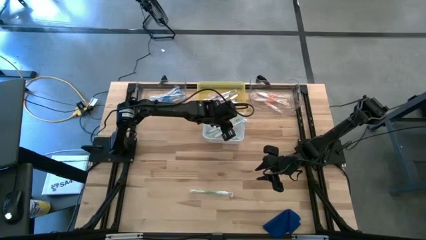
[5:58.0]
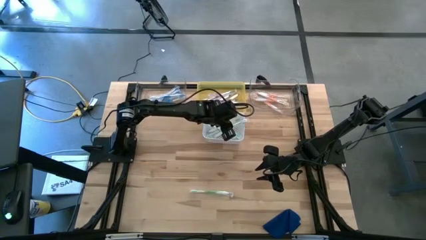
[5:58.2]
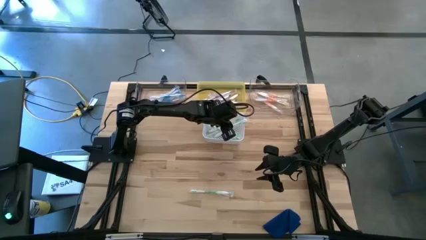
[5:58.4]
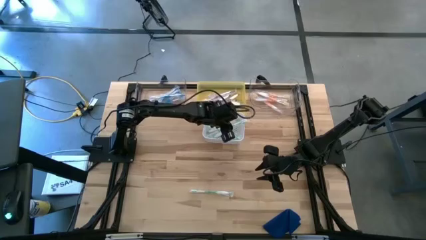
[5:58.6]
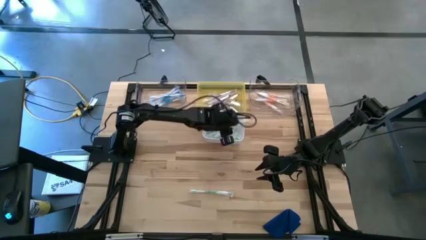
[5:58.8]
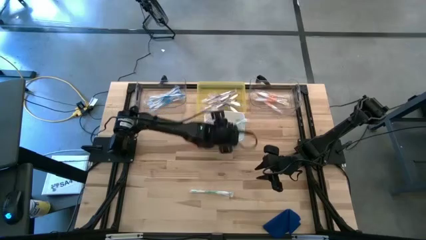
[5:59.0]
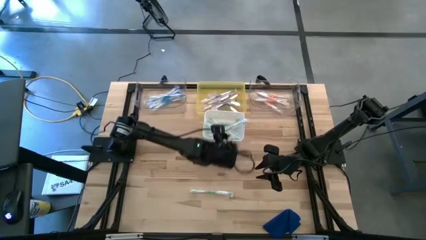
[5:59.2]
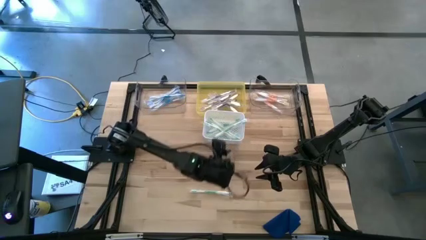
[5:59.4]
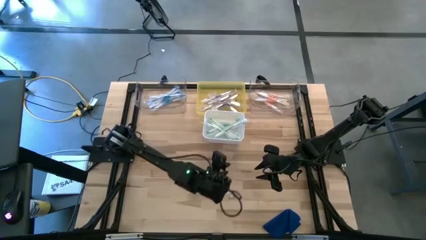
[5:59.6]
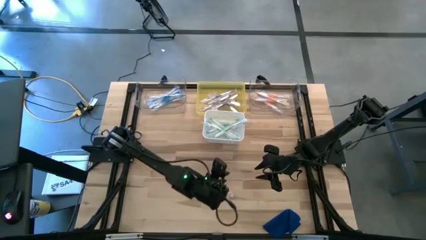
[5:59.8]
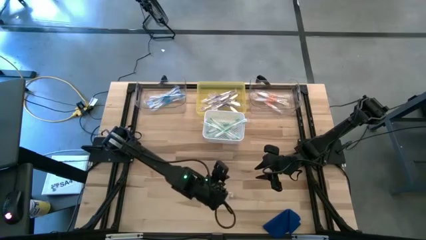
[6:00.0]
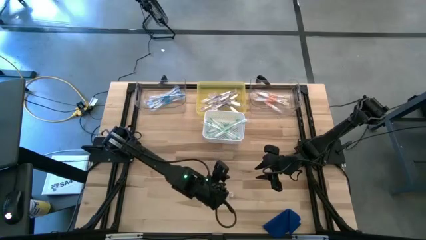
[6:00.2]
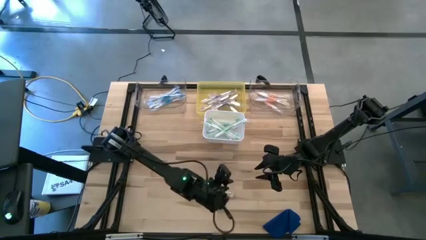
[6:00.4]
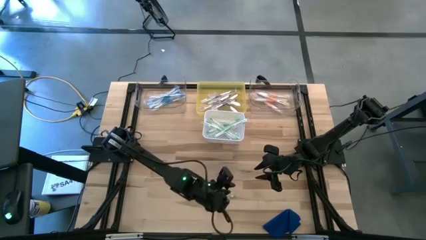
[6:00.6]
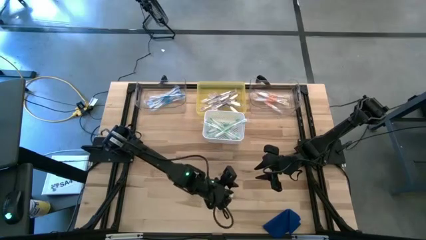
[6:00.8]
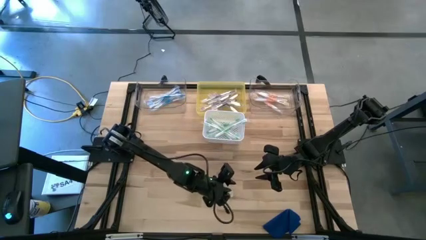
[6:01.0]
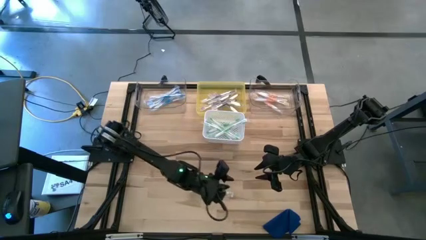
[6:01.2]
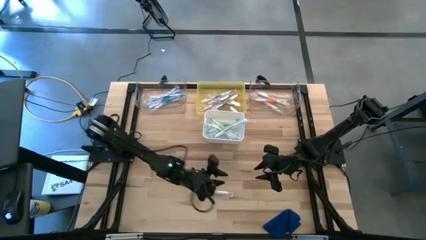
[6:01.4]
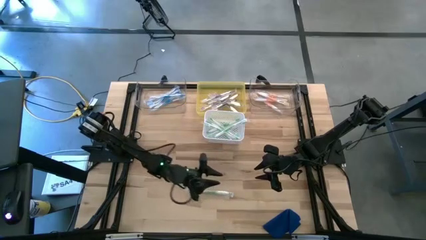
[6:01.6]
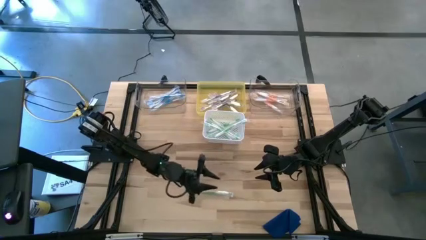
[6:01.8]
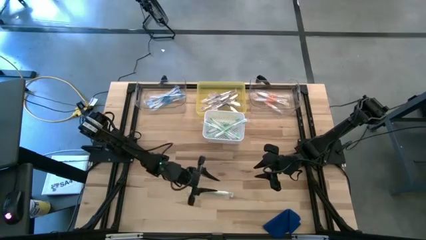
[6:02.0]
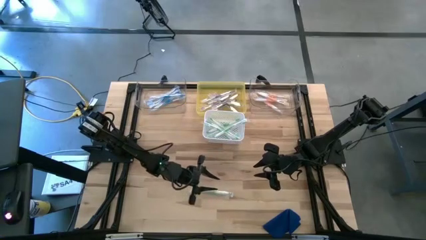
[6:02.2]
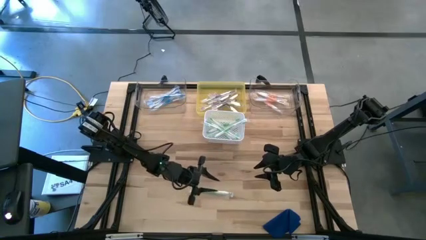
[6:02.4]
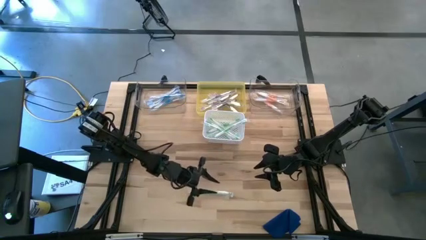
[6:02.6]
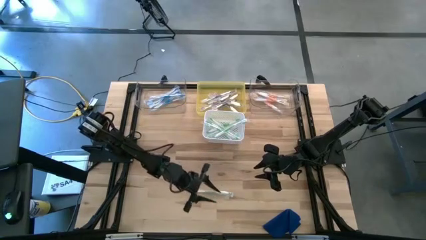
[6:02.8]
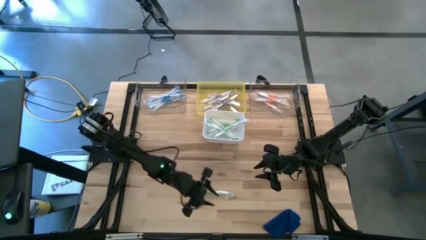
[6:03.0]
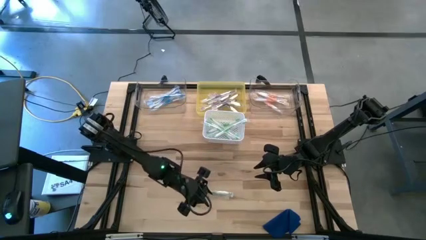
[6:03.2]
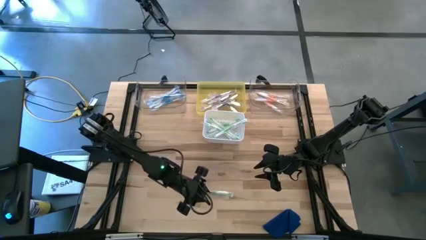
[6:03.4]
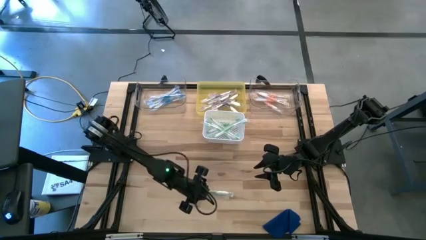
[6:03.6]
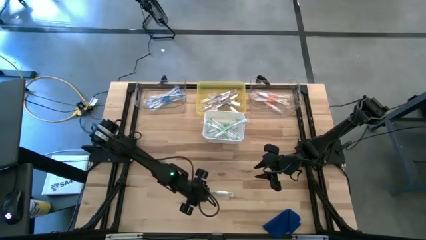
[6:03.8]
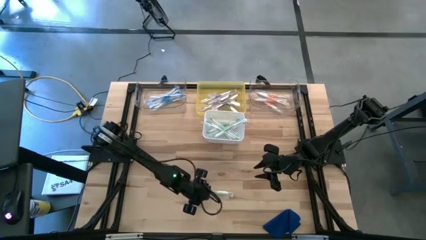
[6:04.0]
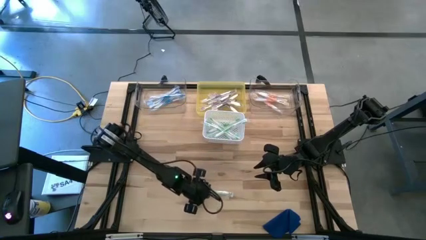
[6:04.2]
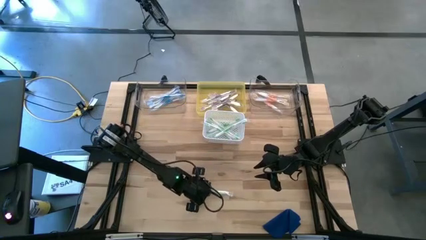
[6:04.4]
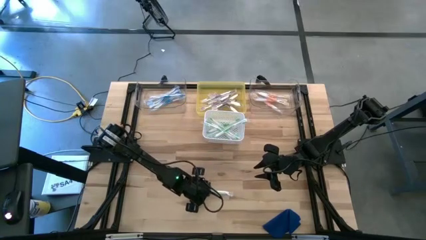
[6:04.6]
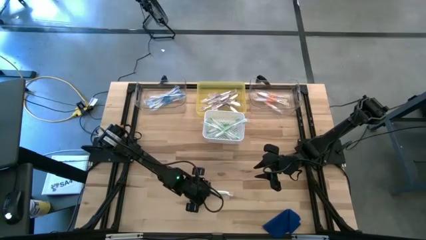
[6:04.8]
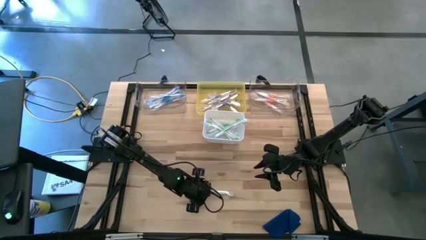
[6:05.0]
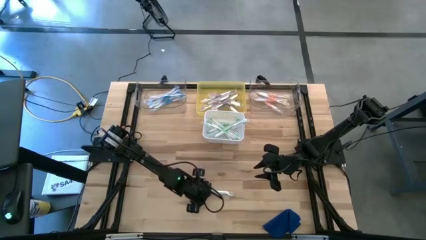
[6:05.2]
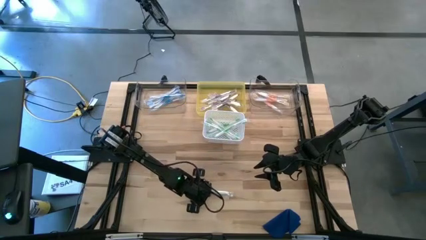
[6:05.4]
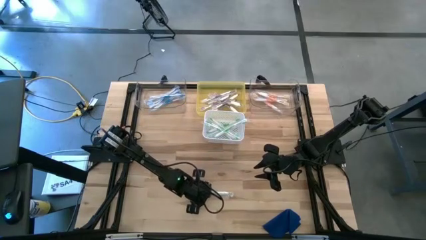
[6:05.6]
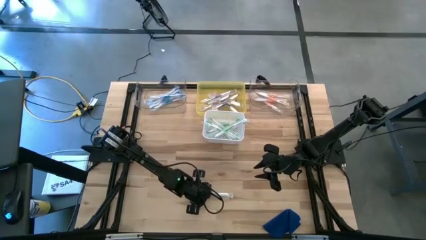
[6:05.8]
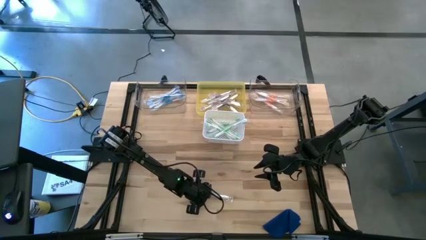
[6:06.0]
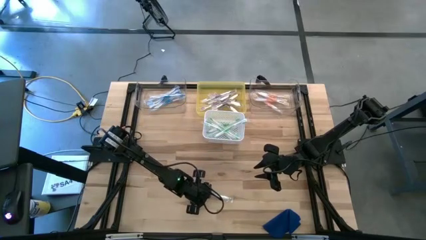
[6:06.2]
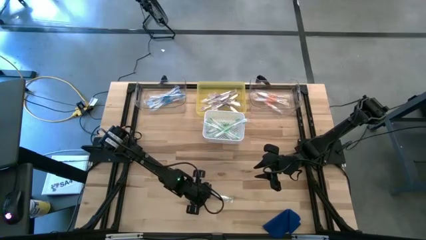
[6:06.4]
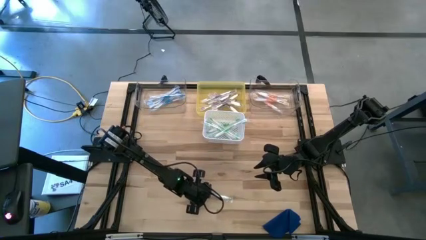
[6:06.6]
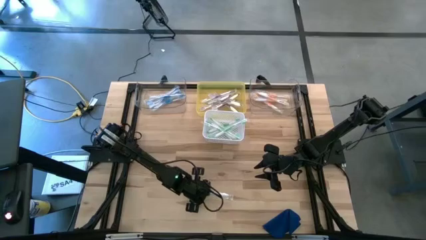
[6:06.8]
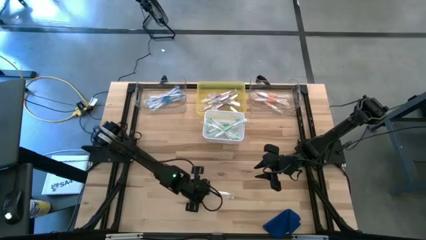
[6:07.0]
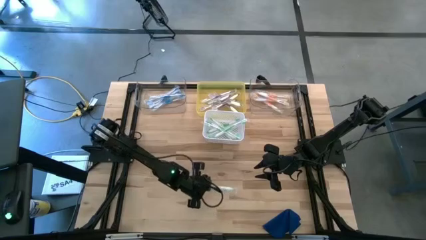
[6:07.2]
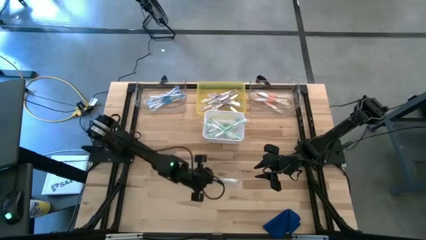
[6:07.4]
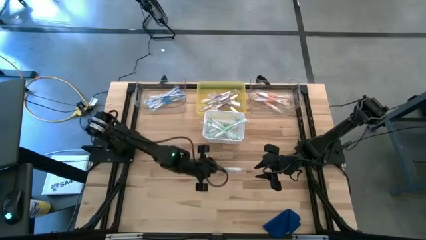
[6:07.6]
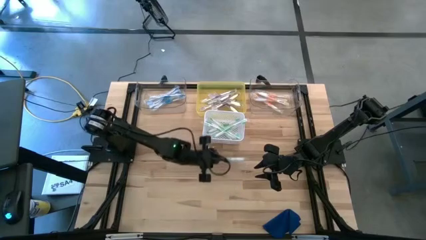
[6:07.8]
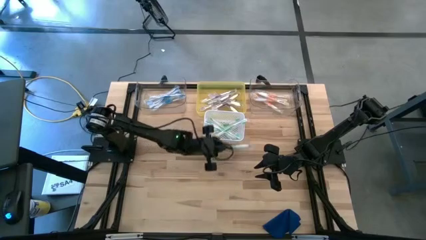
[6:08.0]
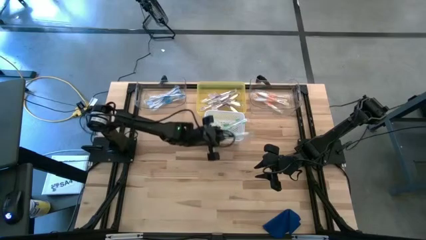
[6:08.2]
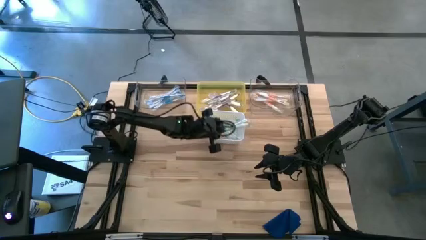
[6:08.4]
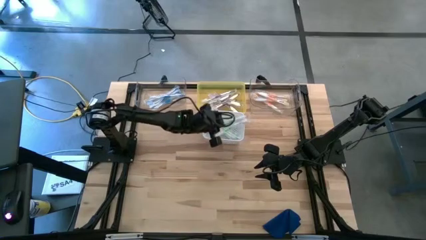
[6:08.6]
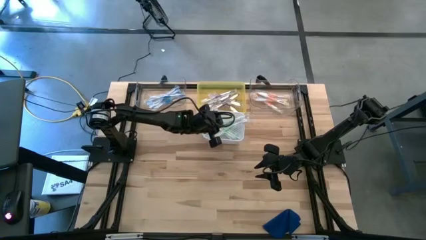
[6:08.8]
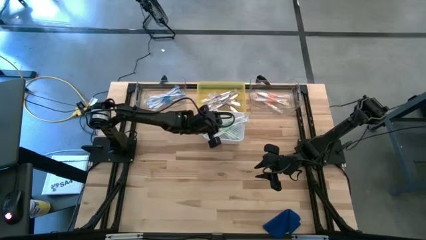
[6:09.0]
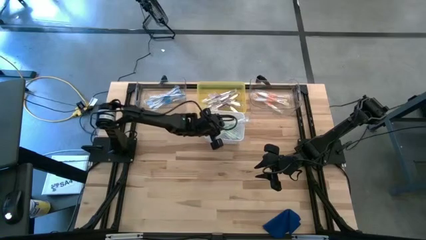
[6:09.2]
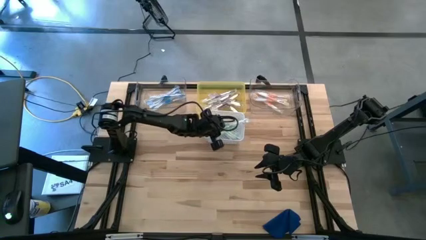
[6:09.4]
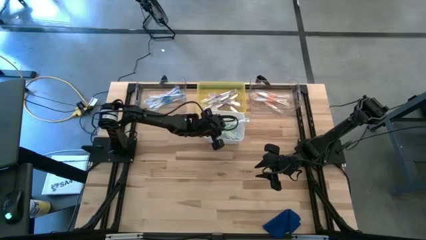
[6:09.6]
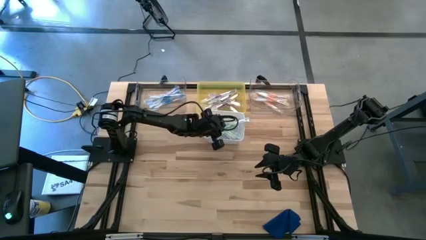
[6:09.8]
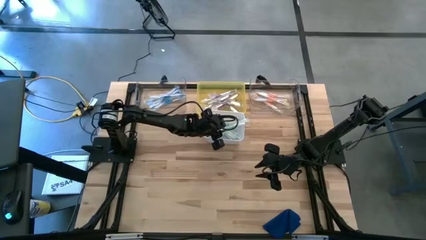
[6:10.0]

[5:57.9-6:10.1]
Task: Pick & Place Toothbrushes
Put the green toothbrush into the white bin
